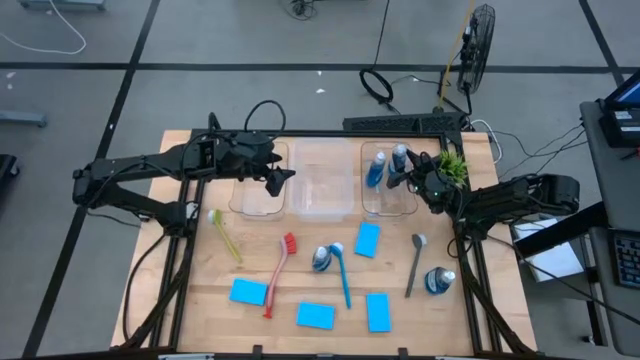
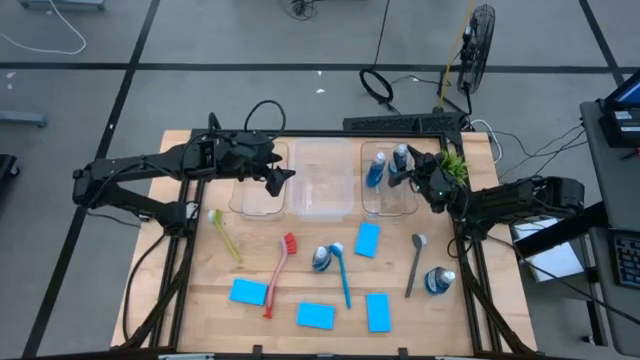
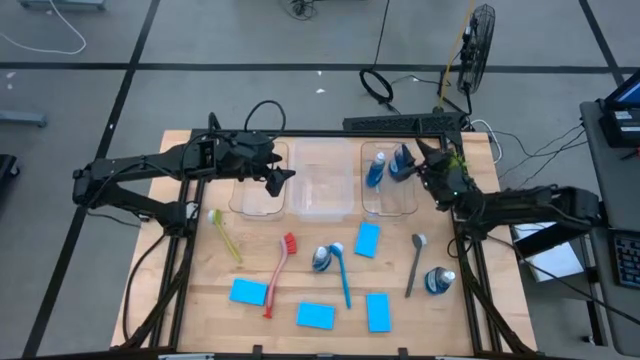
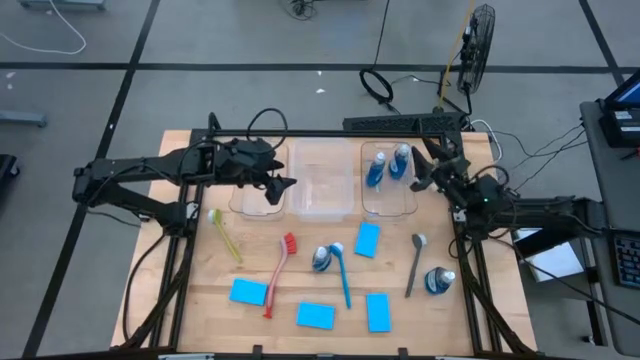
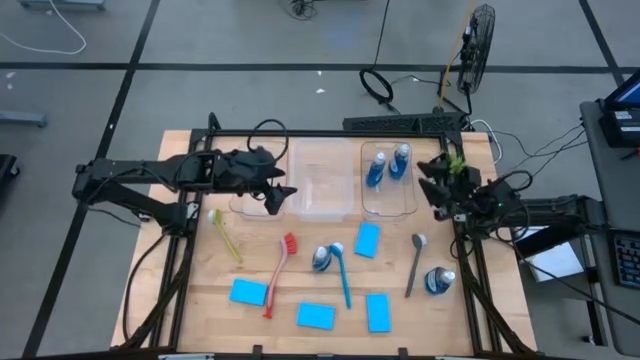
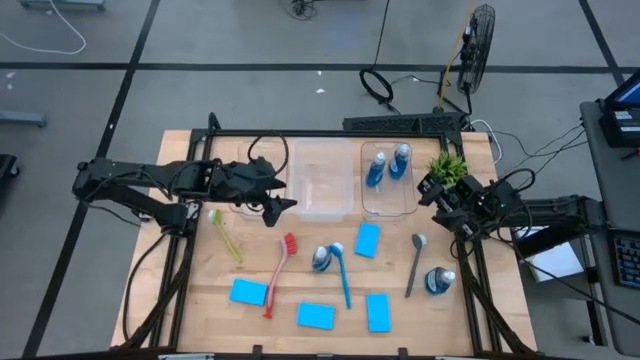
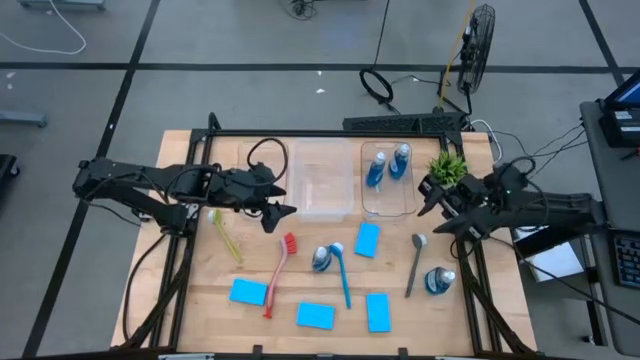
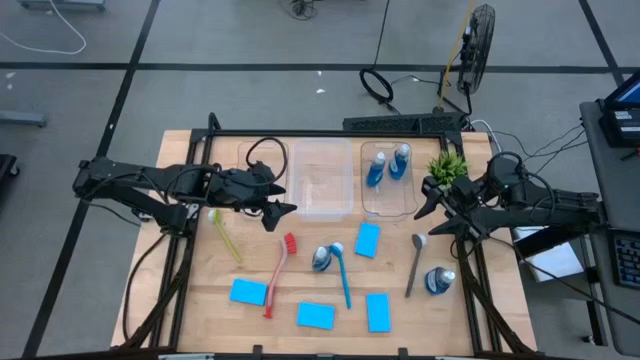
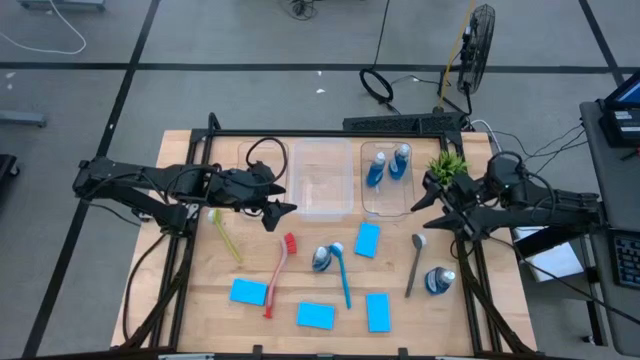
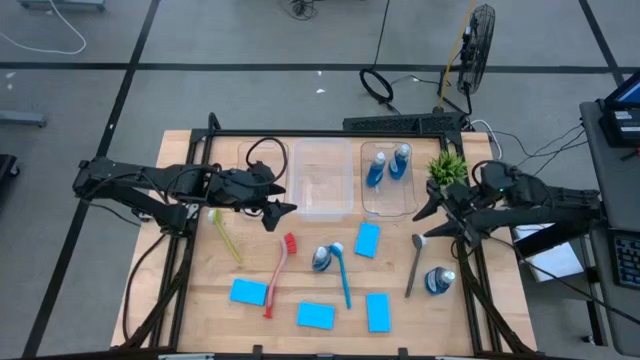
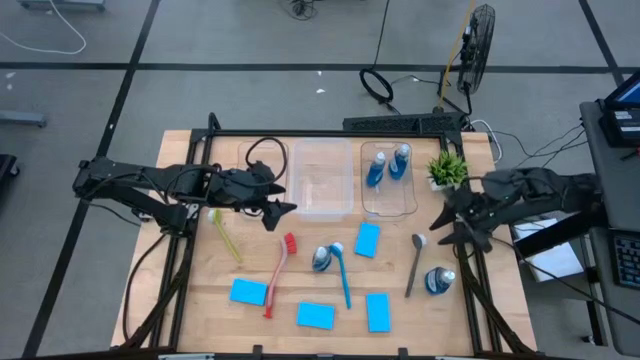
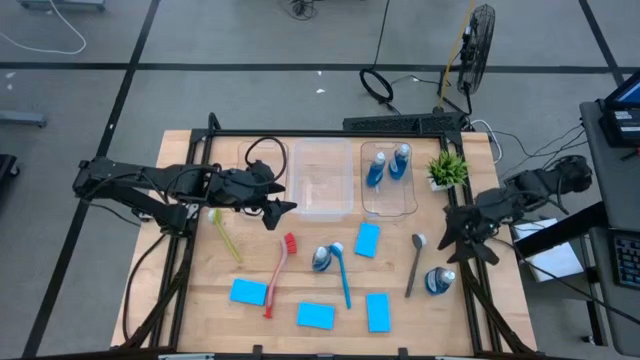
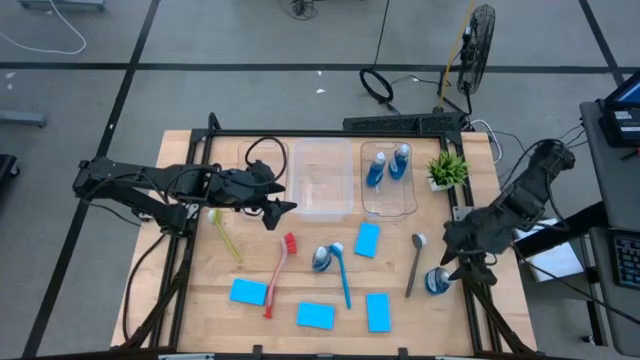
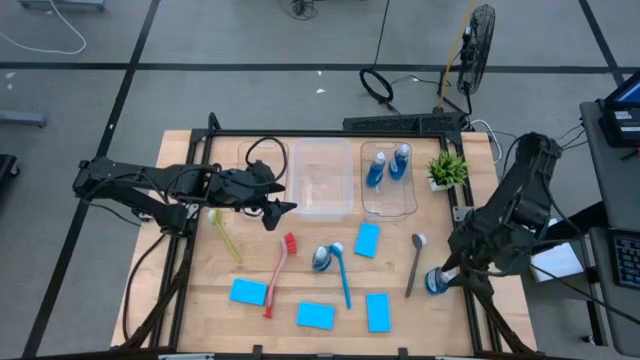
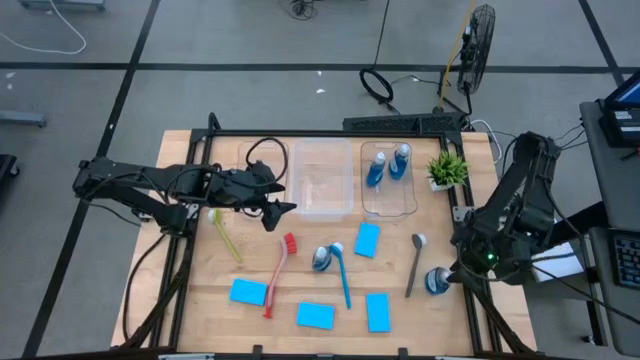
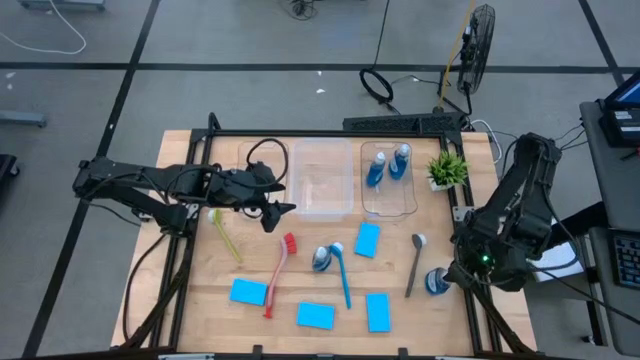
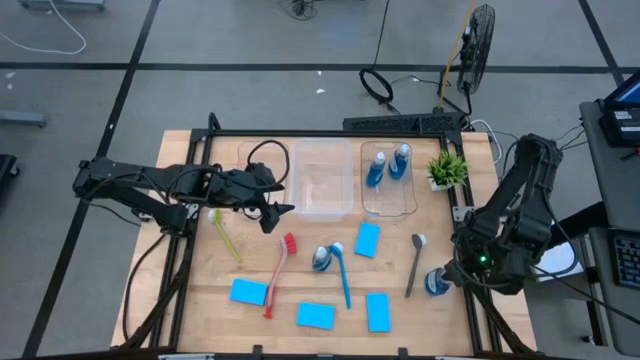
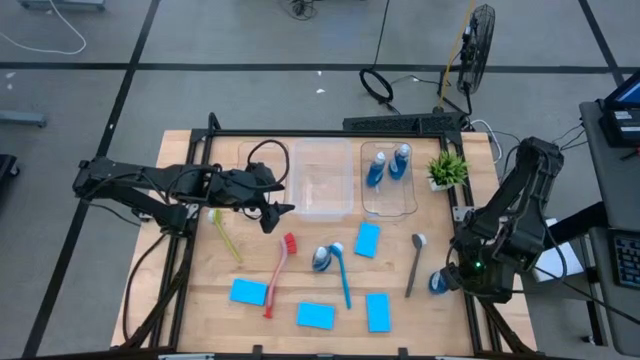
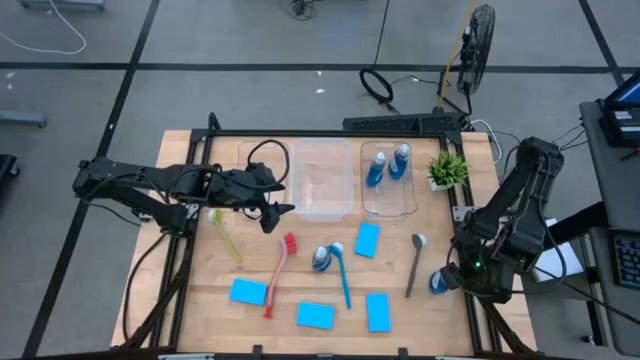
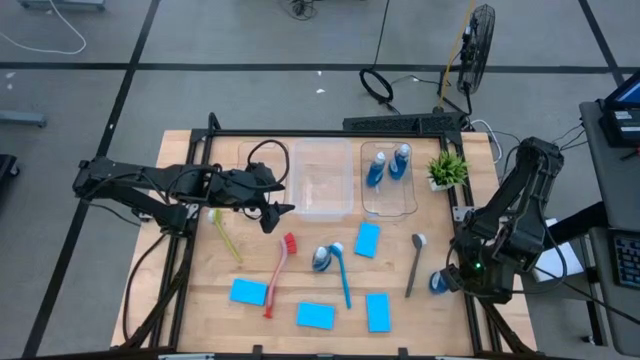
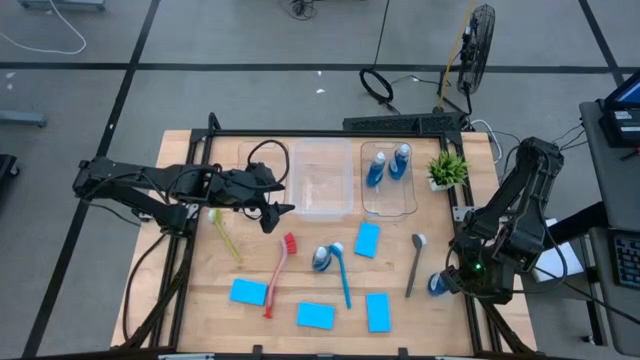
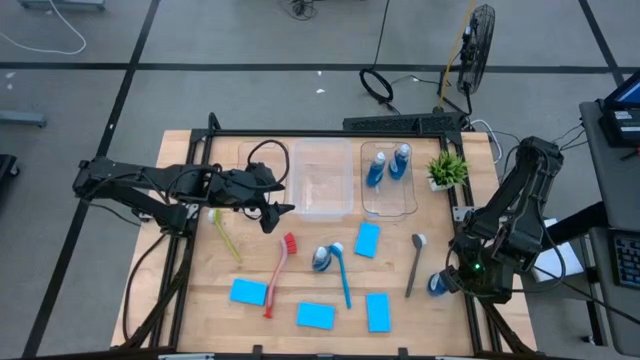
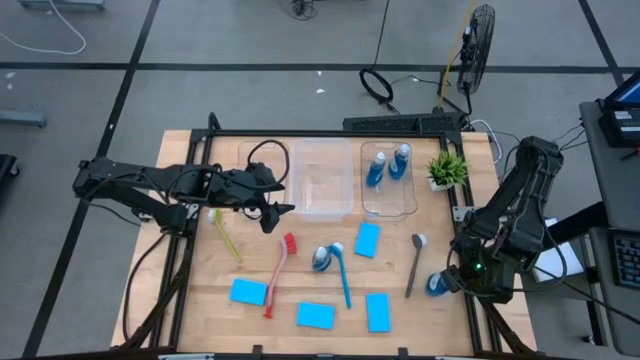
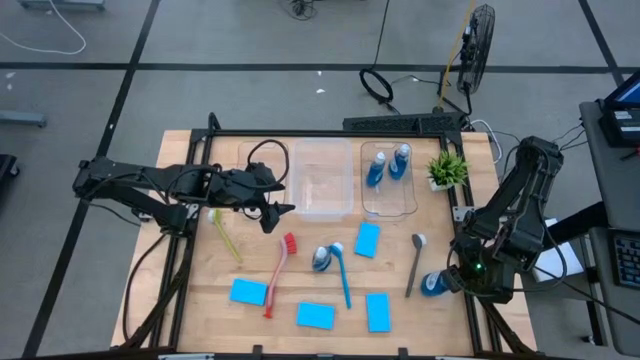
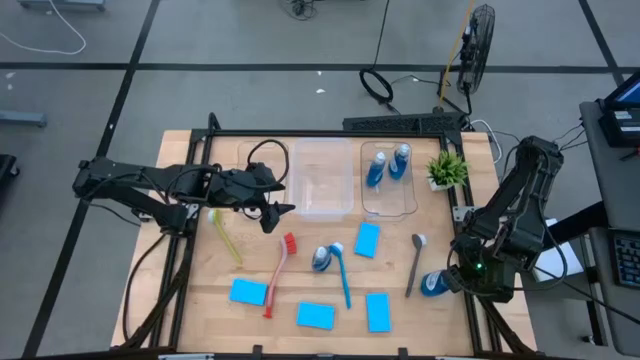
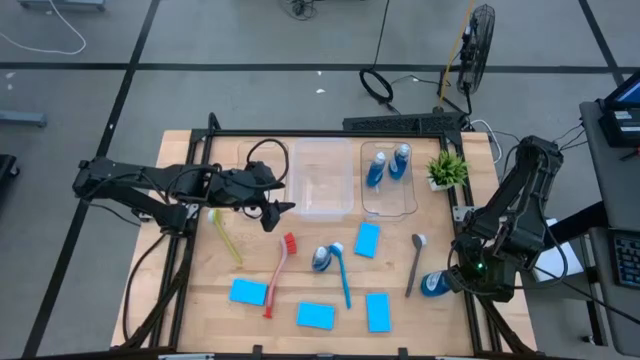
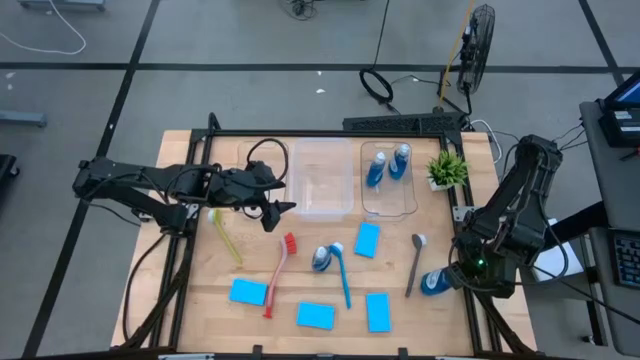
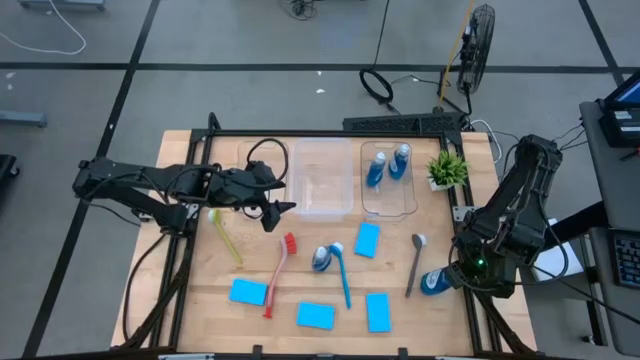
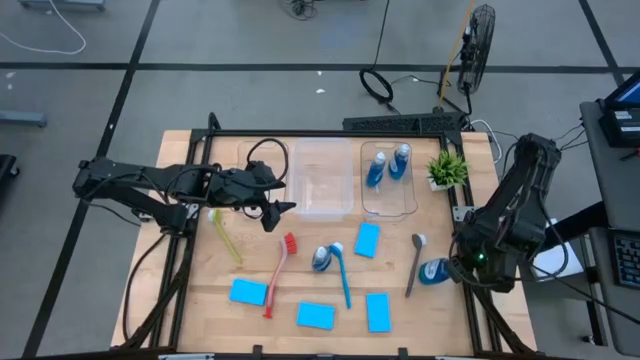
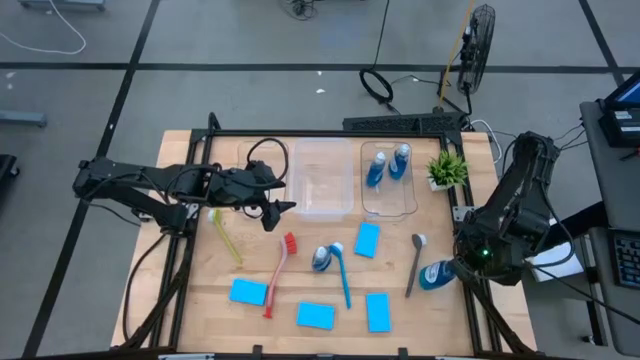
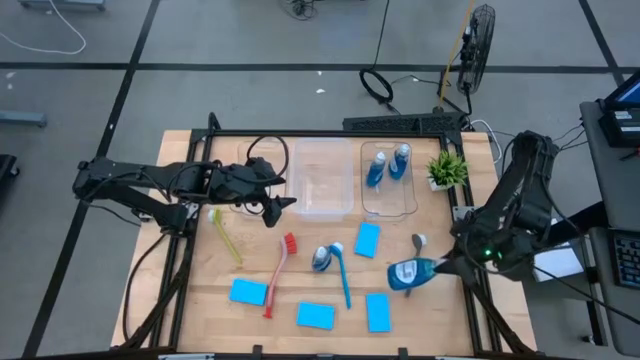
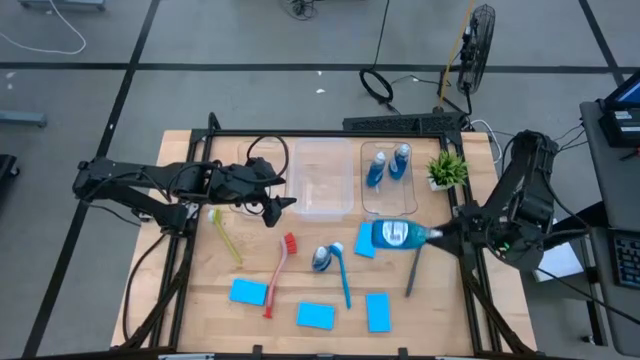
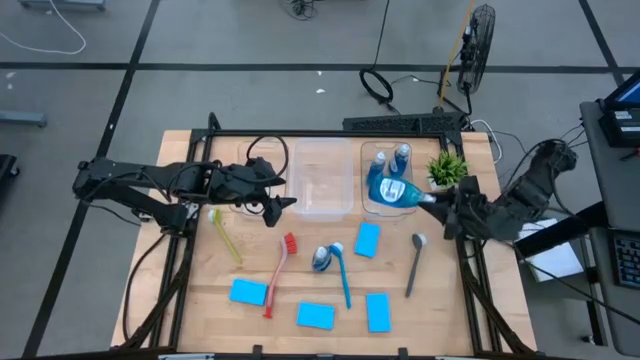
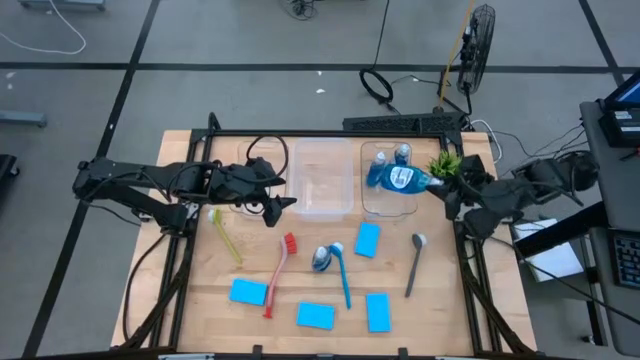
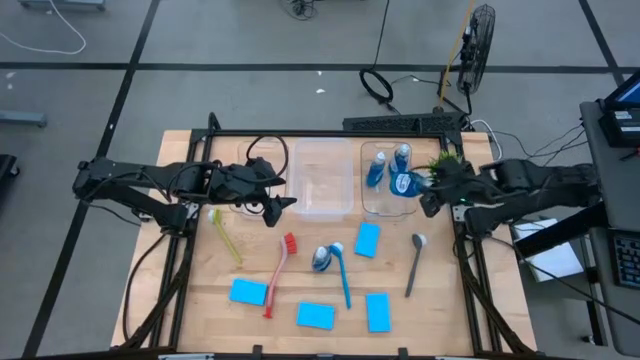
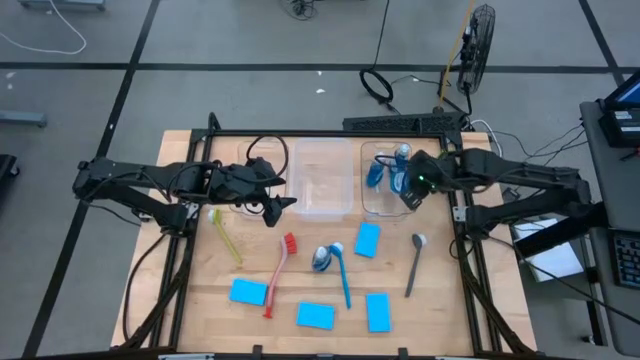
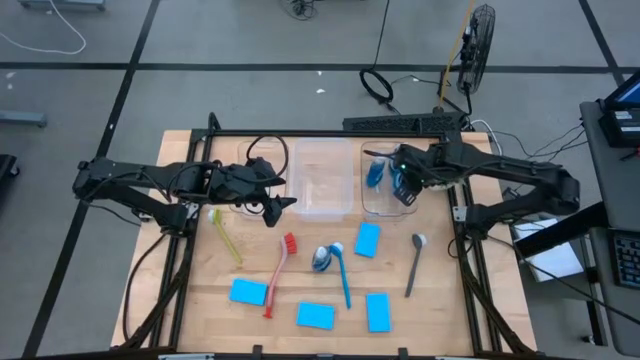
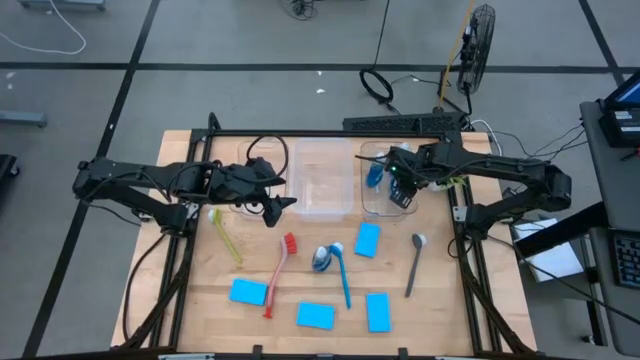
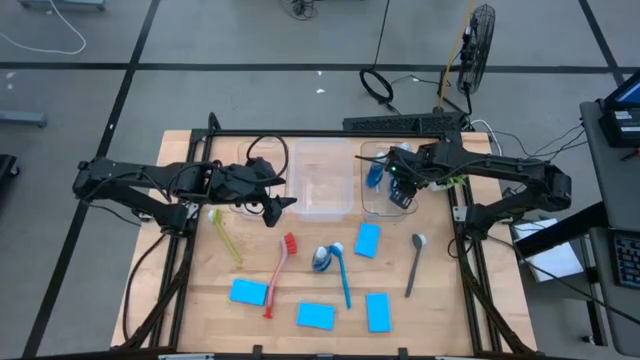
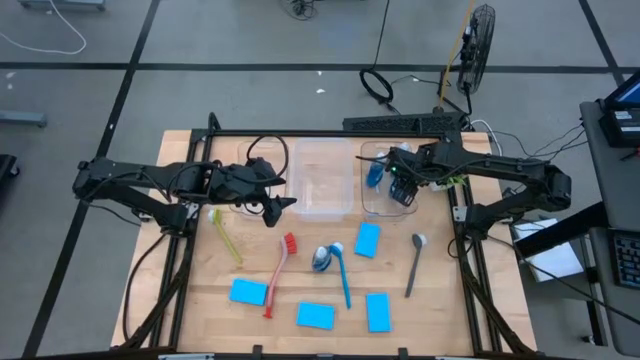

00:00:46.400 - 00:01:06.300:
Task: Pick & Place Kitchen Sink Supplies
Put the blue dishwashing liquid bottle into the right transparent bin
